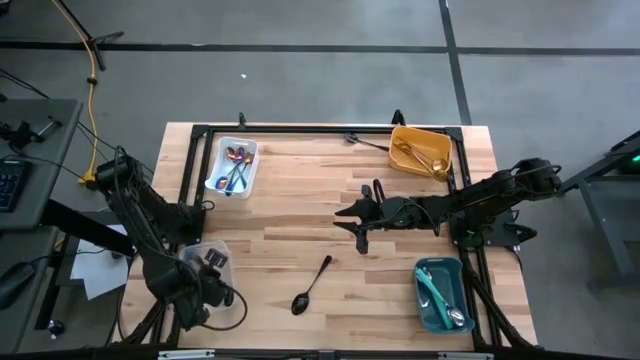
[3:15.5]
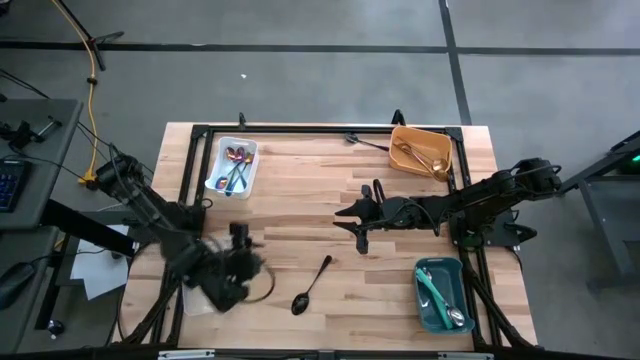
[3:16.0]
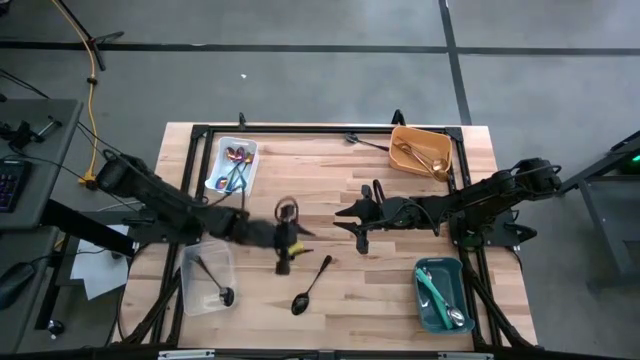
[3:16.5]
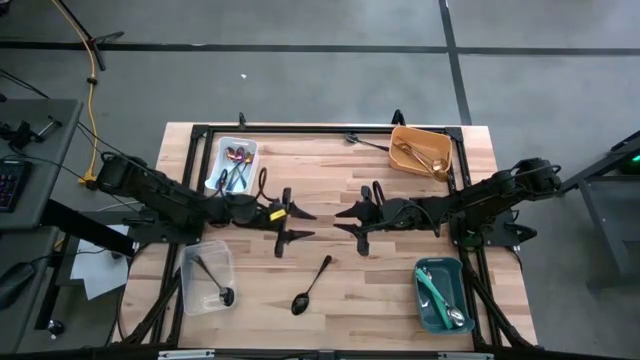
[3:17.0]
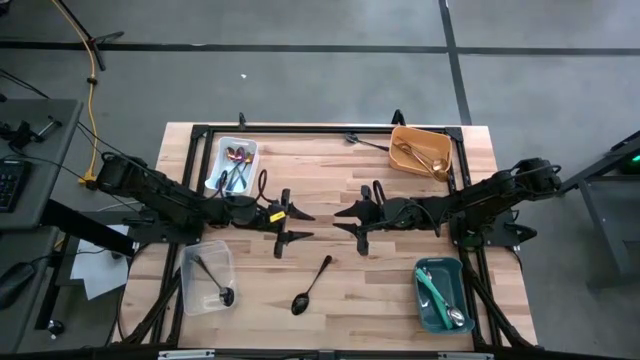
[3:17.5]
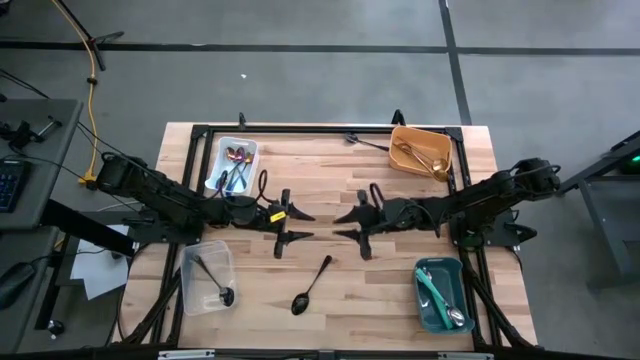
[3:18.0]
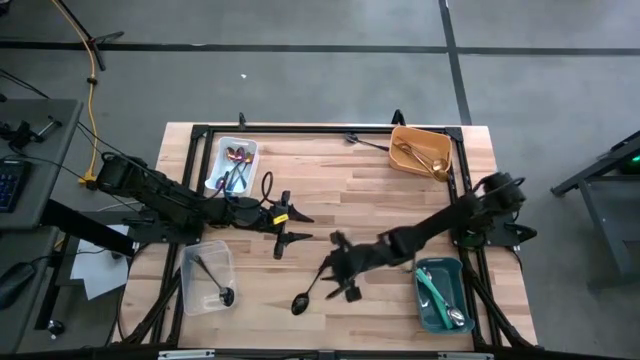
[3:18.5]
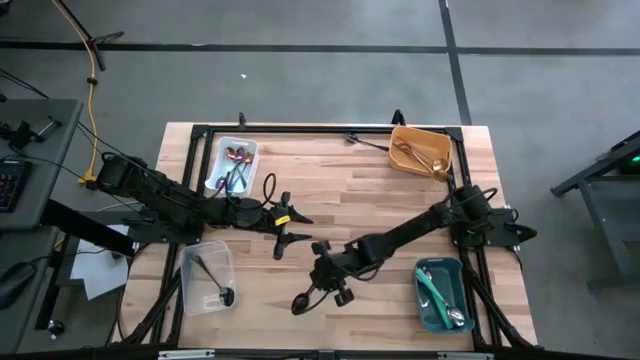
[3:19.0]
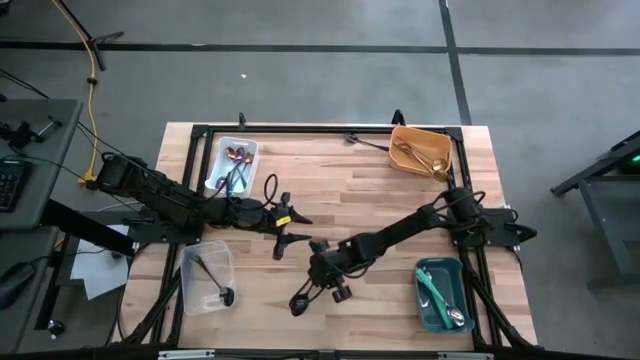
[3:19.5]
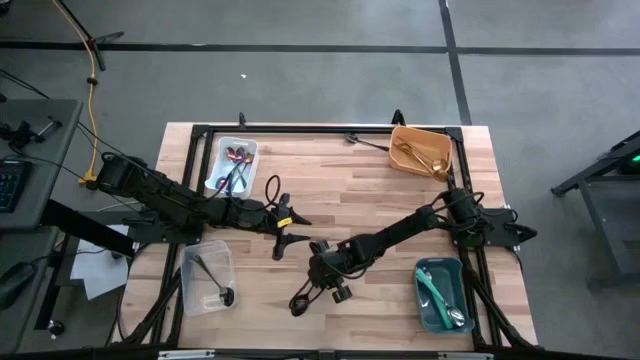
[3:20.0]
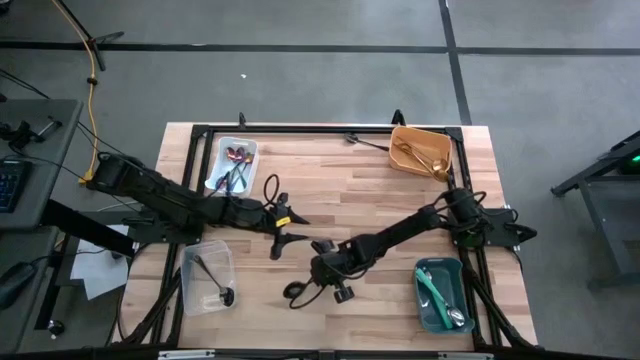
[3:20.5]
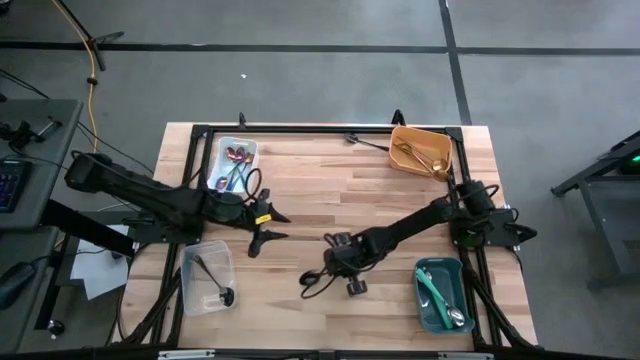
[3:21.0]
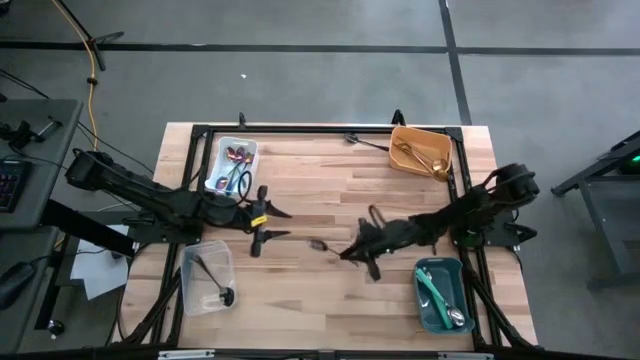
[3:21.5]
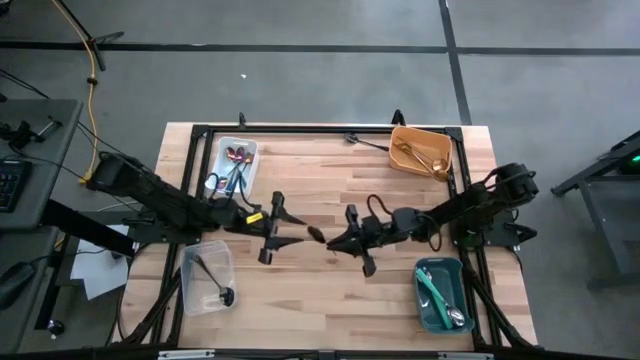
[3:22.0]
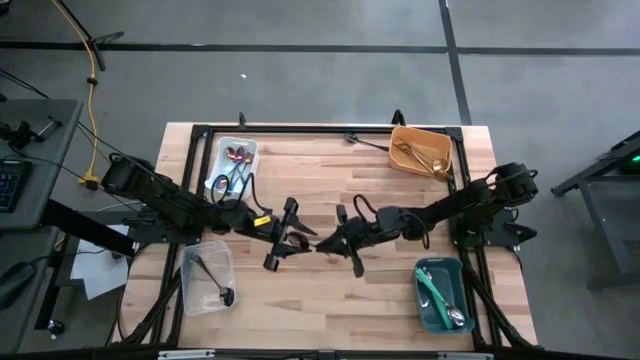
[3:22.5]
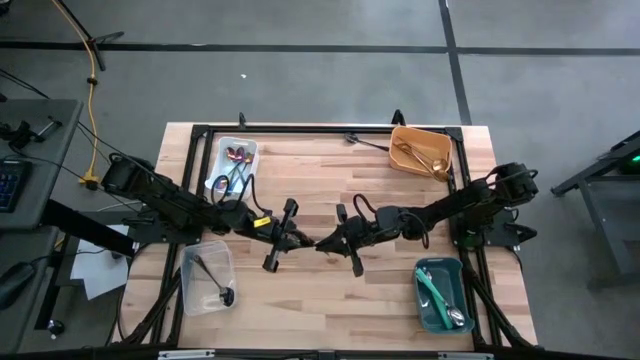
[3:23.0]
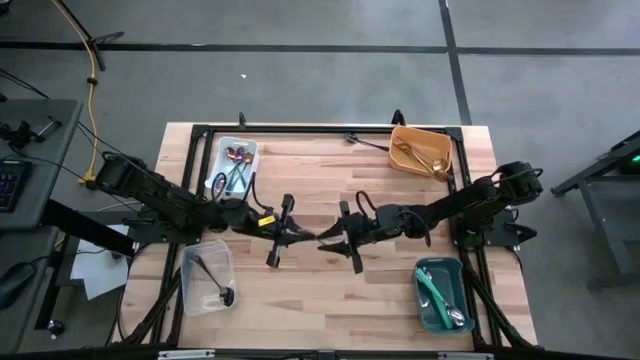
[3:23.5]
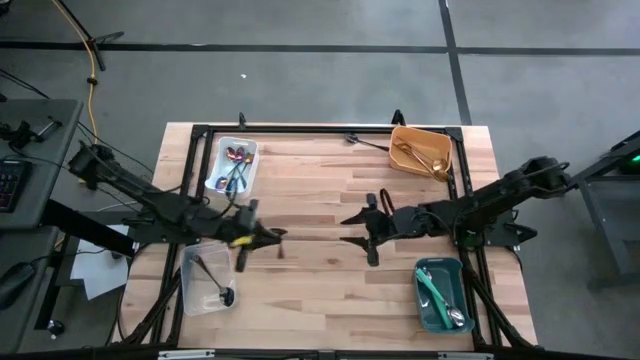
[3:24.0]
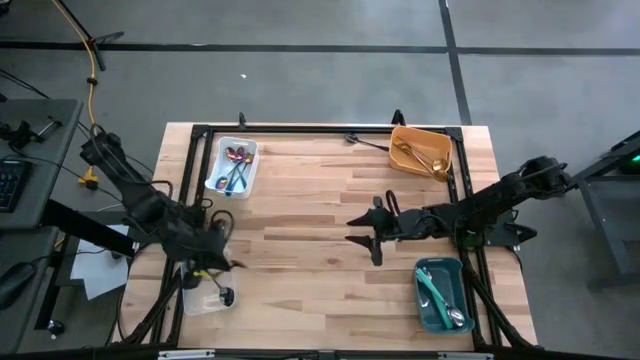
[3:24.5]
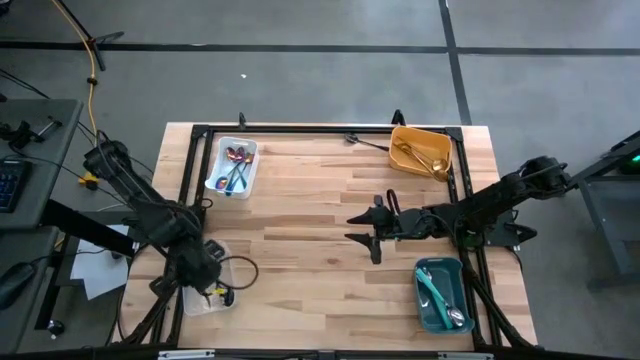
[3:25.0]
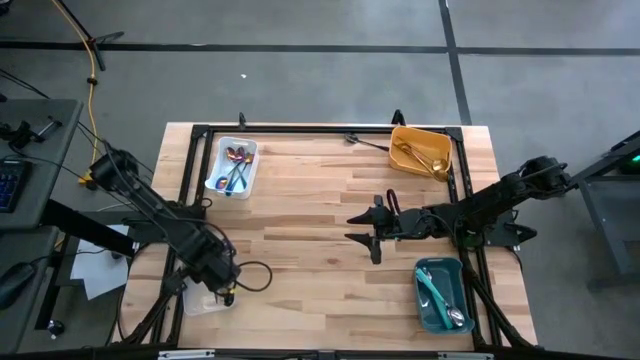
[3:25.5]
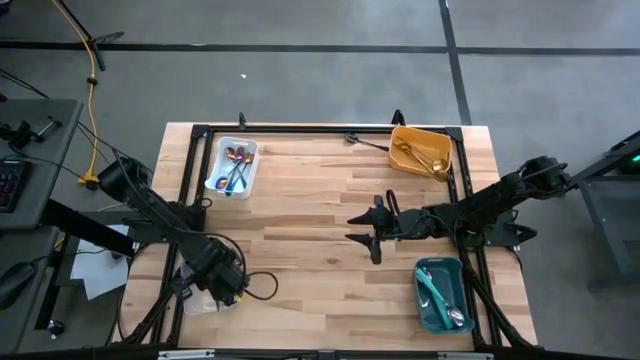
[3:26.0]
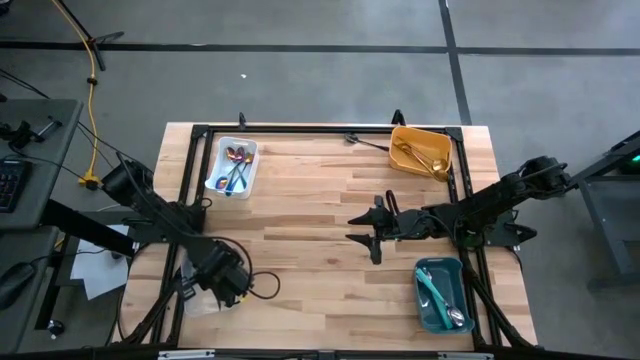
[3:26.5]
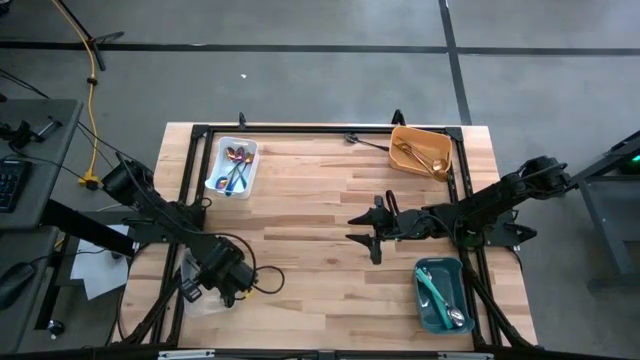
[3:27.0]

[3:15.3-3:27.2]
Task: Sort silverware by color (type)
Put the black spoon into the transparent bin

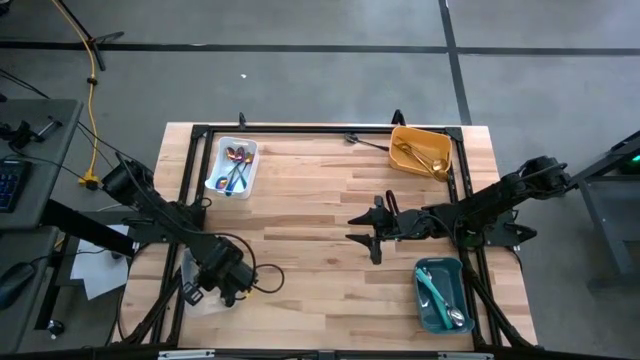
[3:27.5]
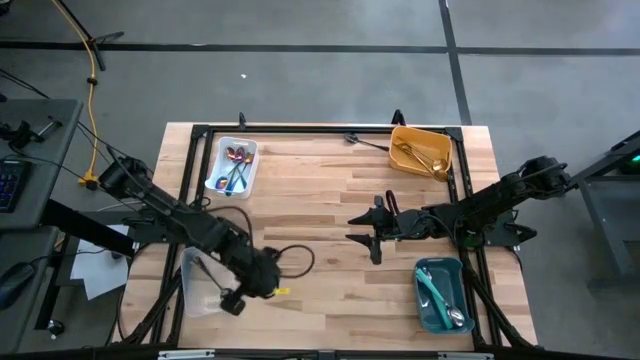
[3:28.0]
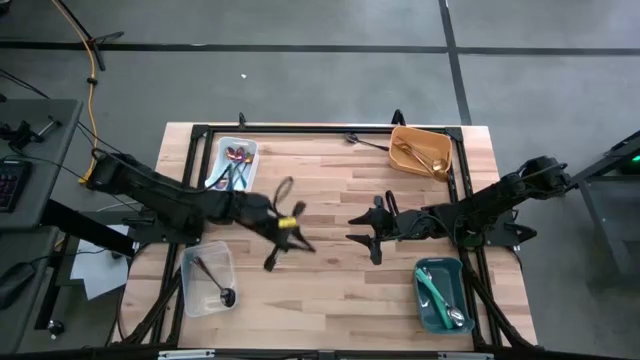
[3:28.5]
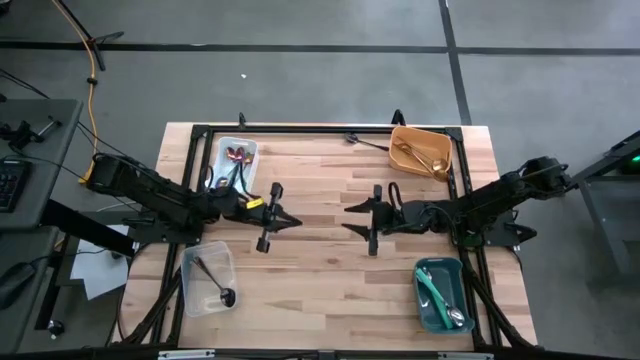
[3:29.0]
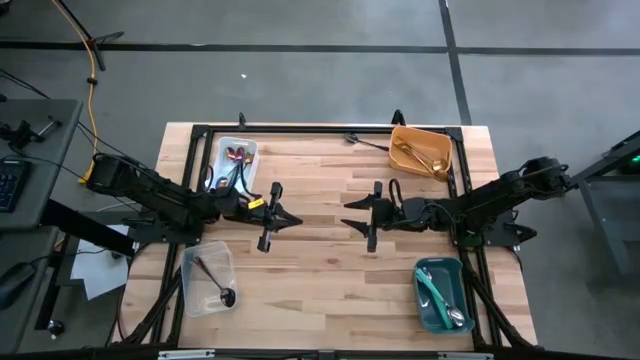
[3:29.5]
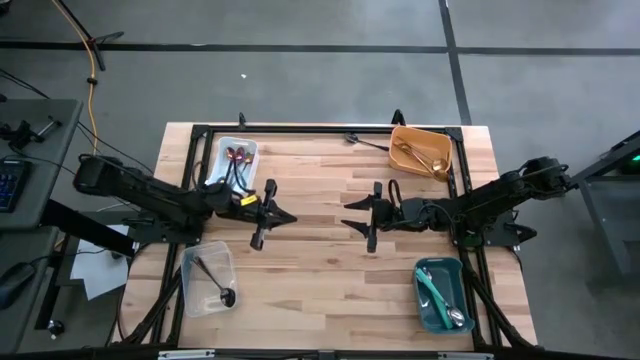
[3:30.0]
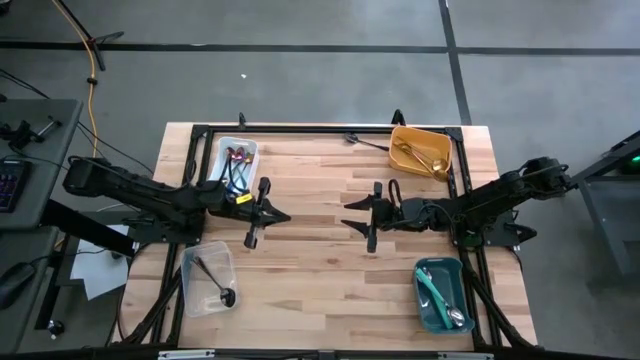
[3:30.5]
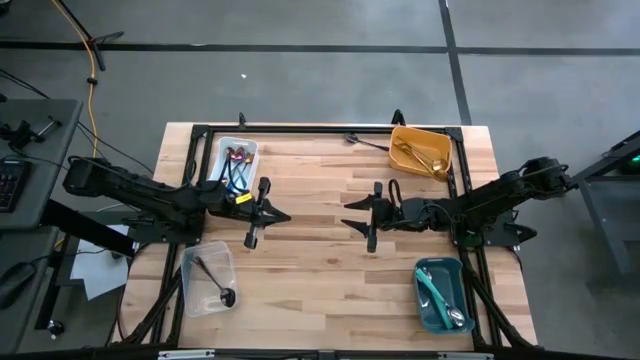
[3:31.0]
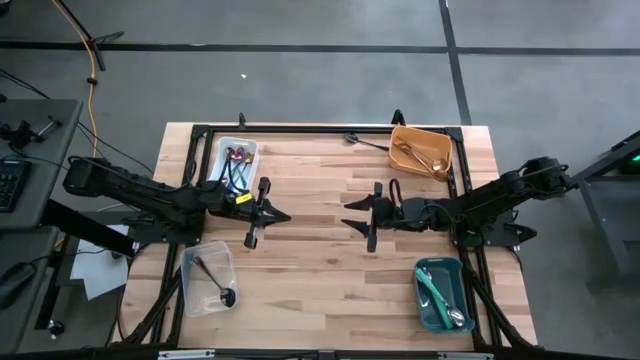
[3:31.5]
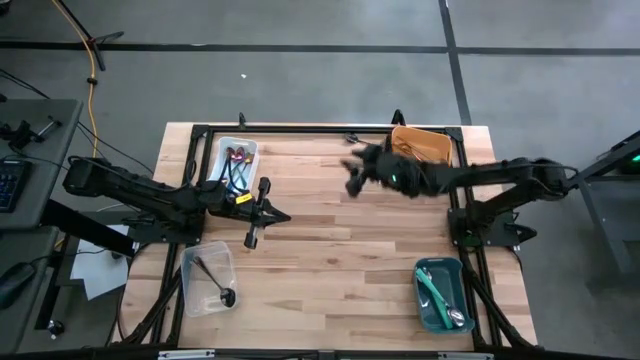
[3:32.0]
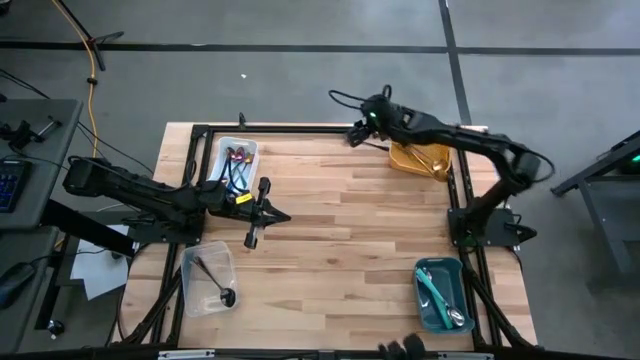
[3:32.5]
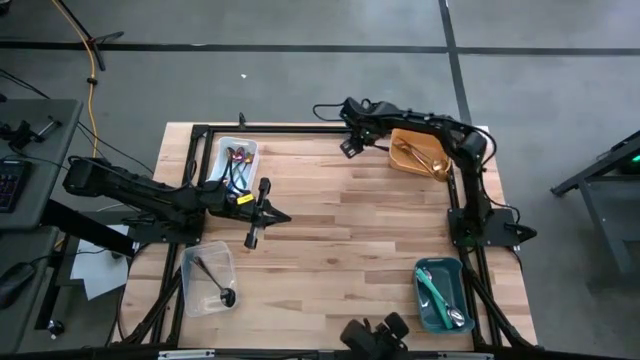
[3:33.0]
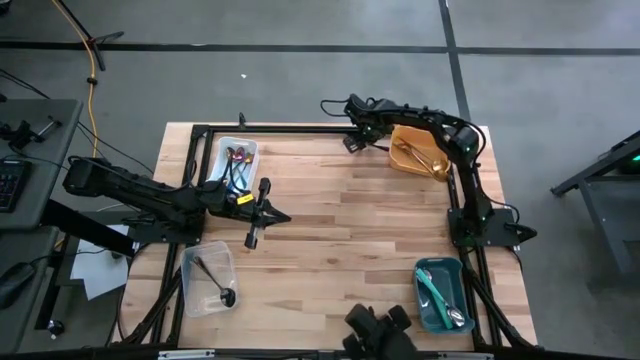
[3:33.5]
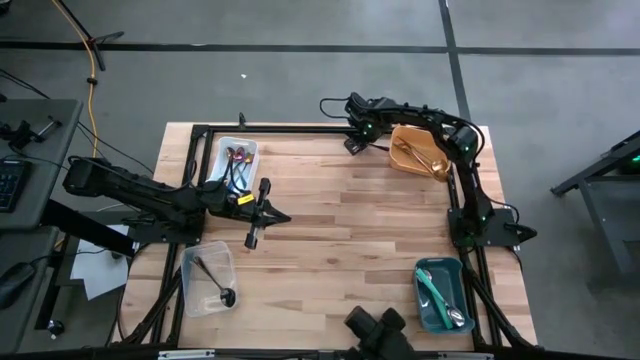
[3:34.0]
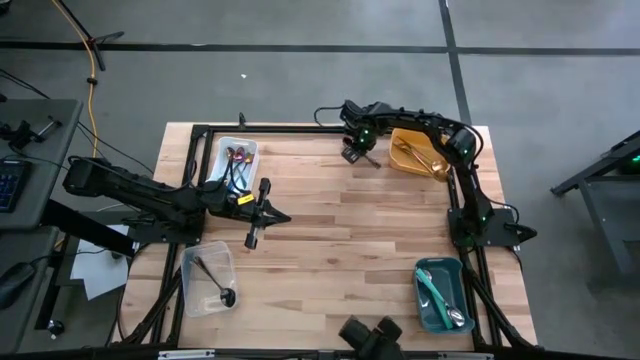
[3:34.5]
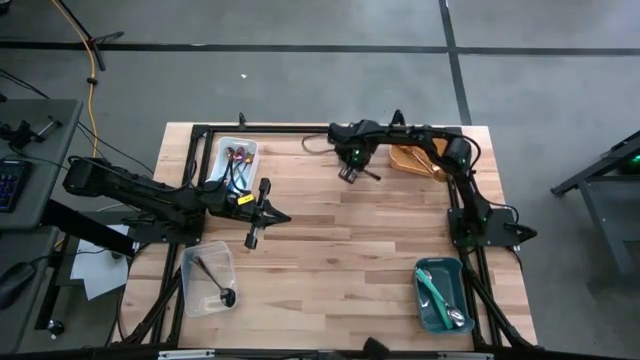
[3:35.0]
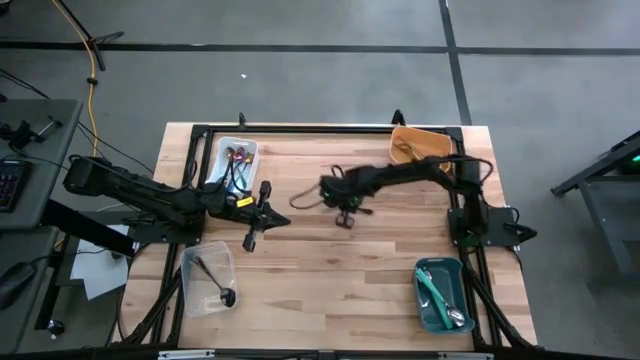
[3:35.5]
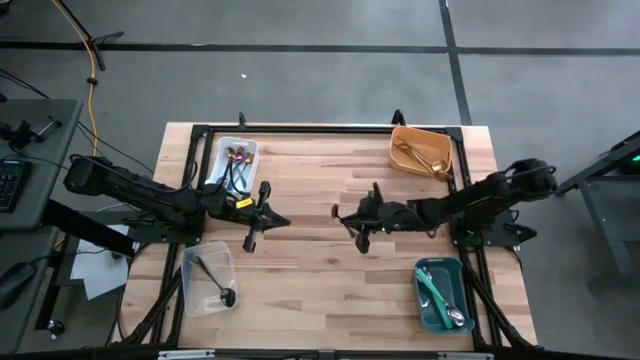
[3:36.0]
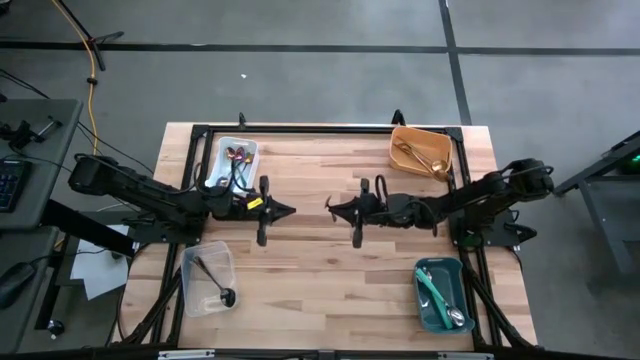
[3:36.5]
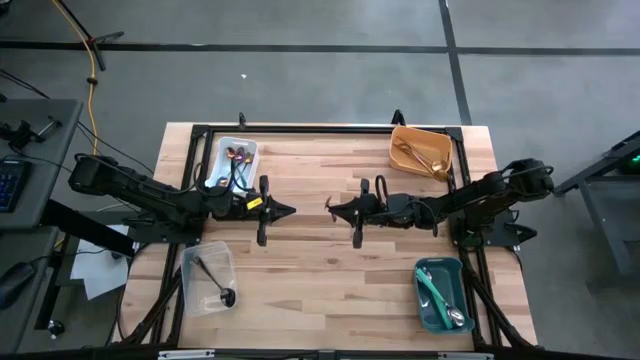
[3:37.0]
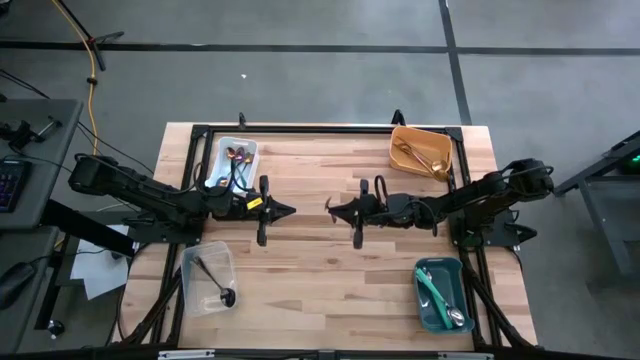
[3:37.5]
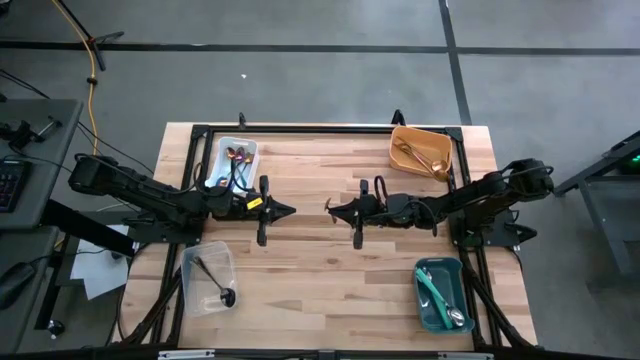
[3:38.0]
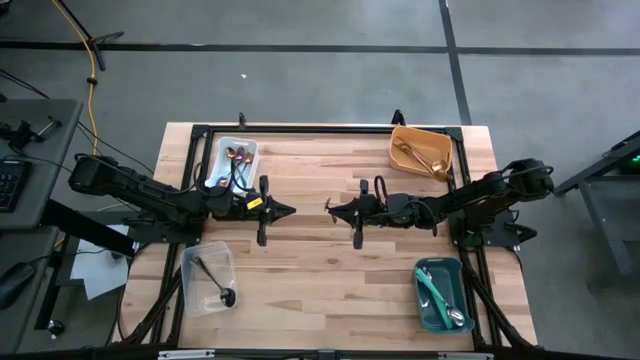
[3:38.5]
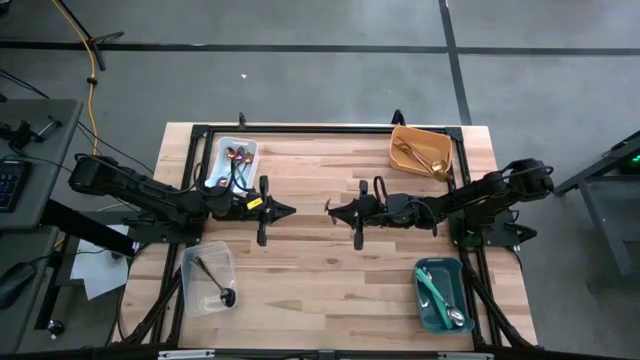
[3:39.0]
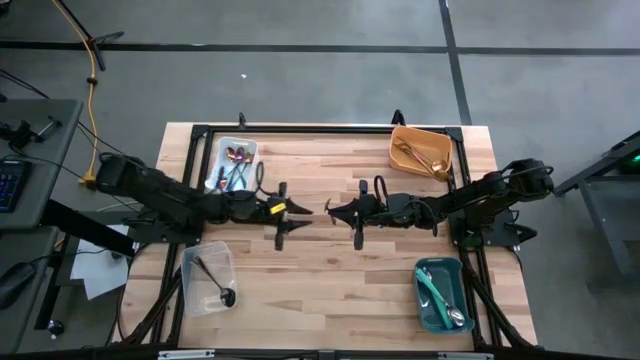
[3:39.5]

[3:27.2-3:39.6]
Put the black spoon into the transparent bin
